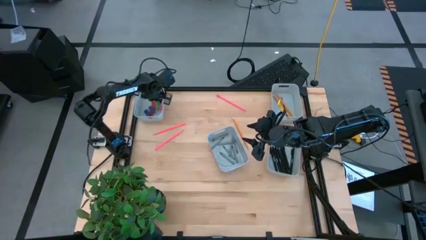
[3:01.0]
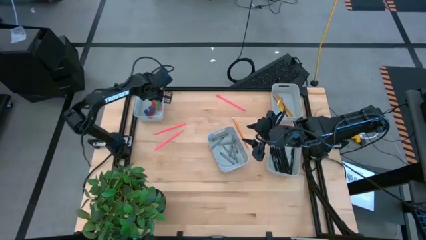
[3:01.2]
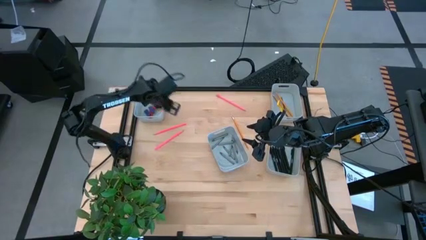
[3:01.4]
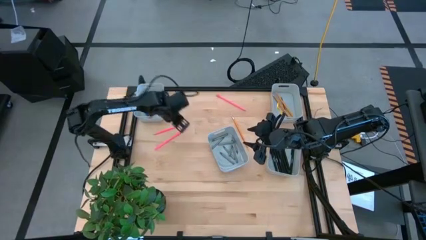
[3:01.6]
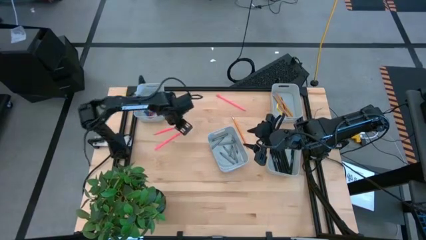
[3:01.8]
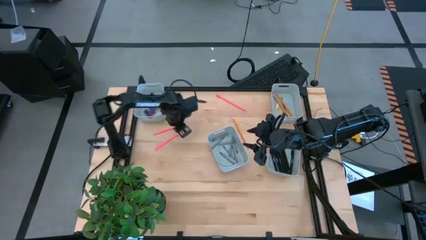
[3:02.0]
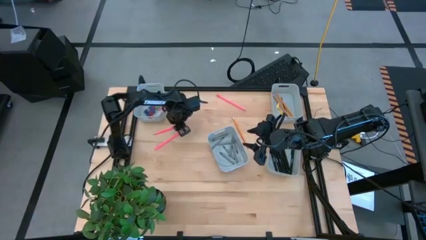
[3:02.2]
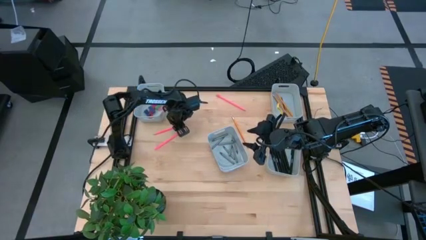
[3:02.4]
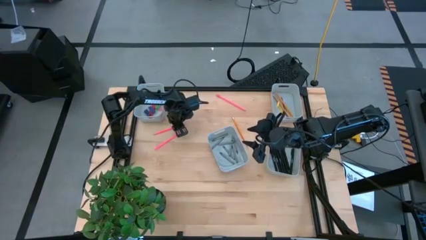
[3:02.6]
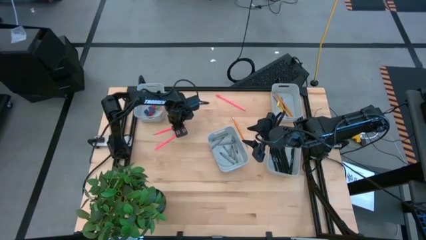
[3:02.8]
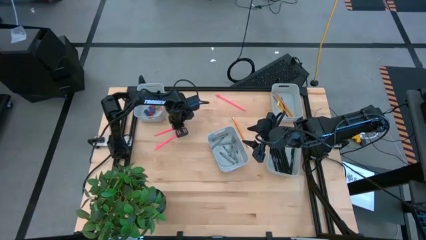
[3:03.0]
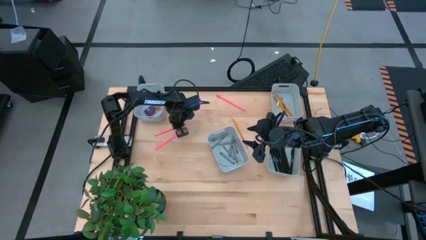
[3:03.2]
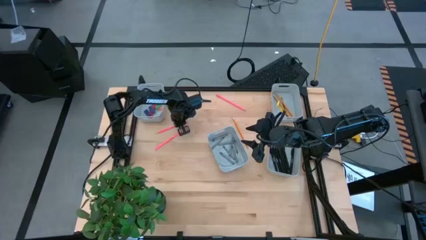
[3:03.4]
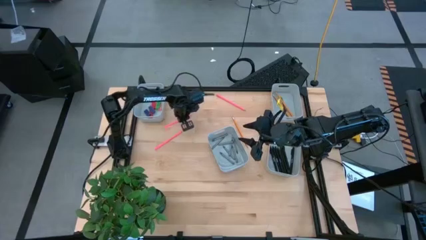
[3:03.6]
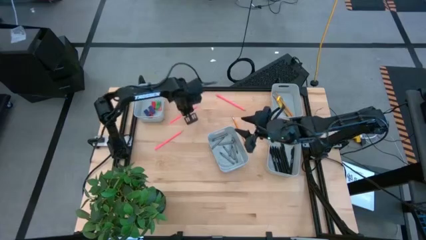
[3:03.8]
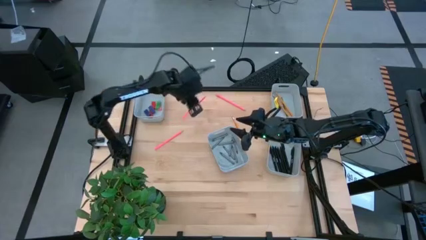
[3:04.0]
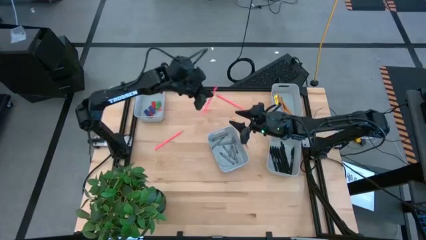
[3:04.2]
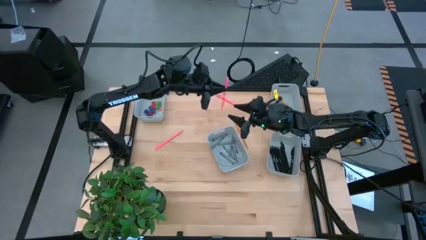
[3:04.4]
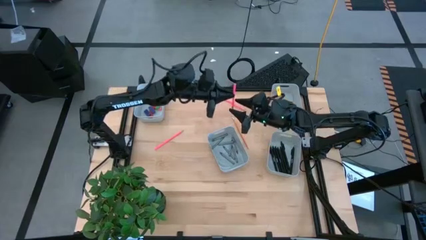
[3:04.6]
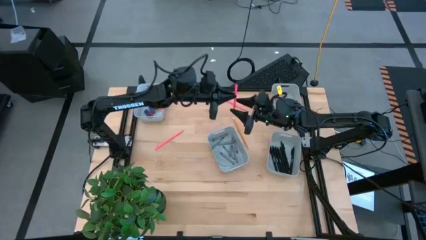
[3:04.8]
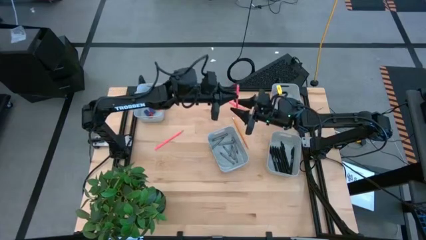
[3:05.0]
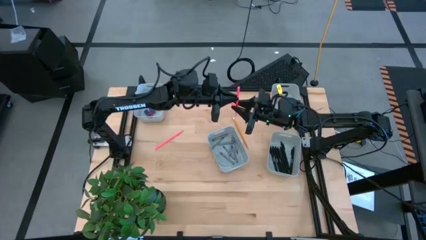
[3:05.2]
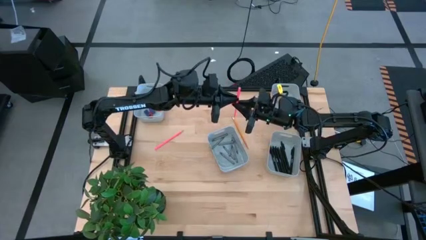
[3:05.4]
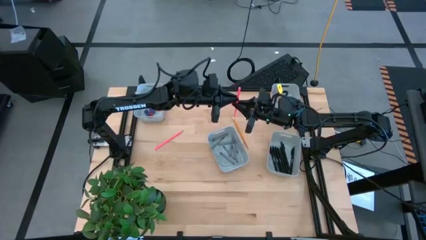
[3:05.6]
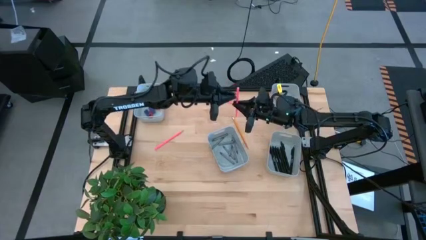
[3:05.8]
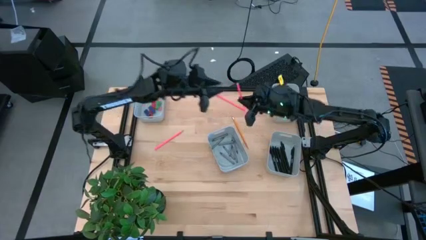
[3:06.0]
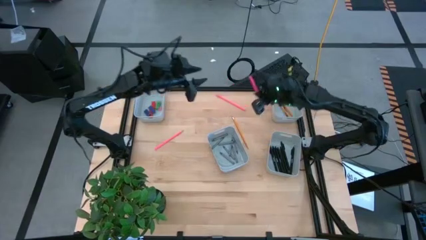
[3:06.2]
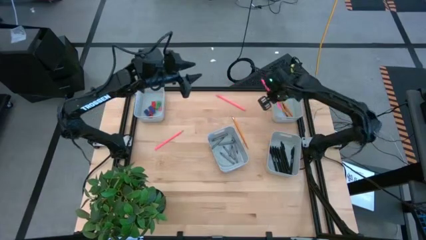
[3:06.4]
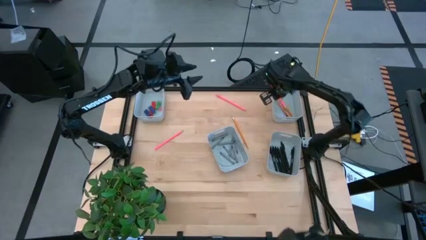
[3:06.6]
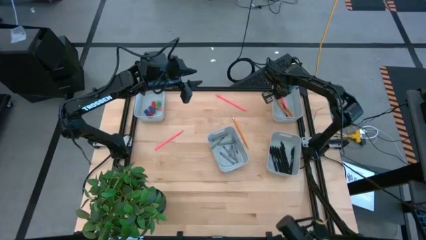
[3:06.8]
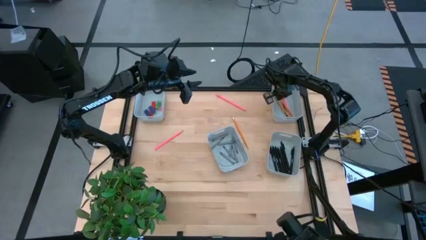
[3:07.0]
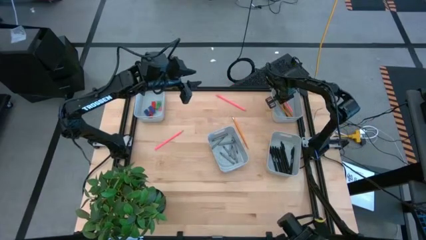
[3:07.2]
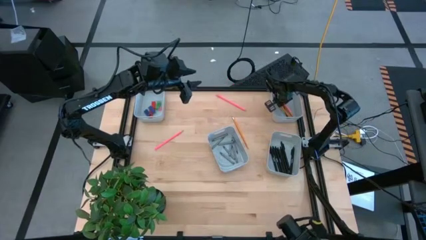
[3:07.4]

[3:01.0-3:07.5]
Task: Sort crayons/erasers/pens/pencils in bins
Put the pink pencil into the top right gray bin

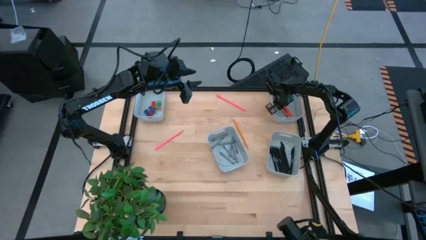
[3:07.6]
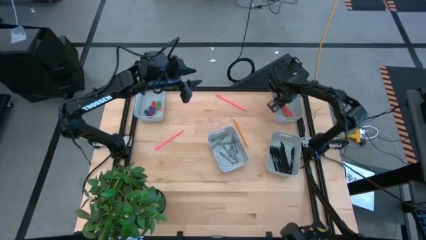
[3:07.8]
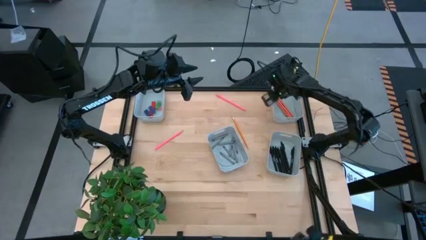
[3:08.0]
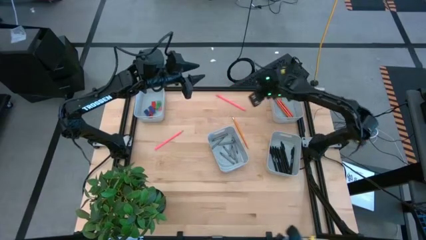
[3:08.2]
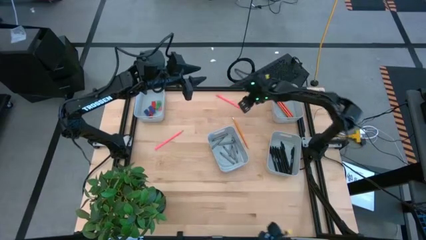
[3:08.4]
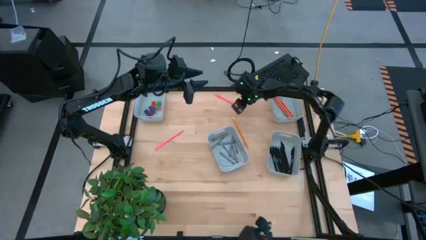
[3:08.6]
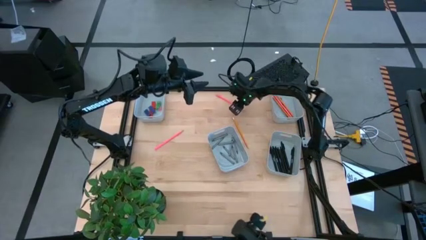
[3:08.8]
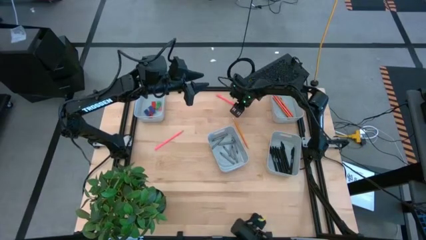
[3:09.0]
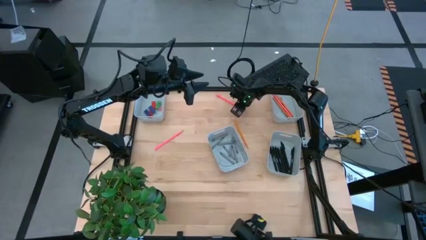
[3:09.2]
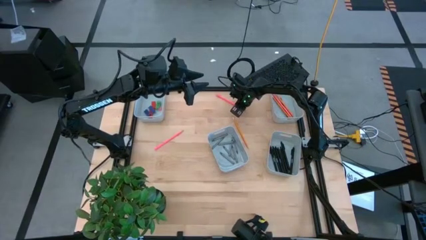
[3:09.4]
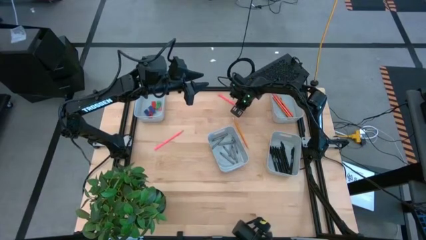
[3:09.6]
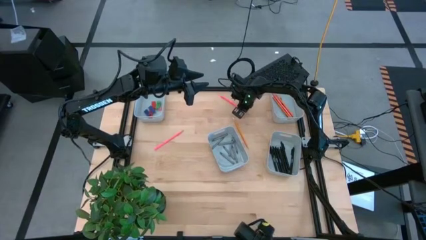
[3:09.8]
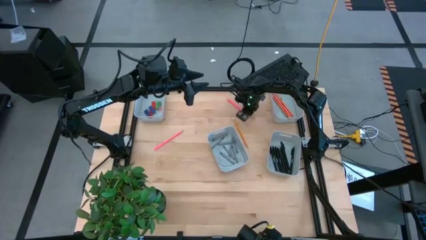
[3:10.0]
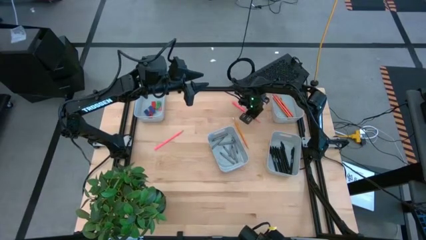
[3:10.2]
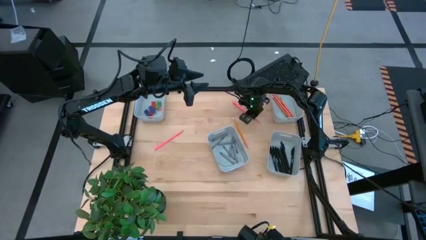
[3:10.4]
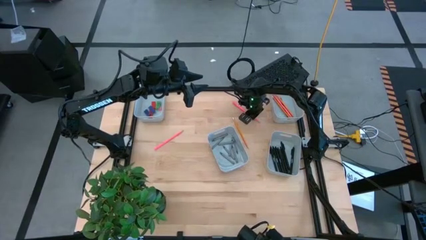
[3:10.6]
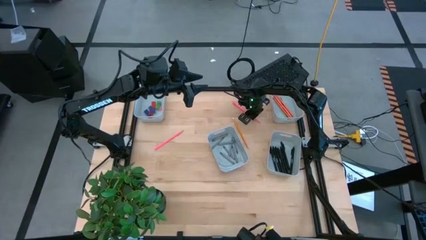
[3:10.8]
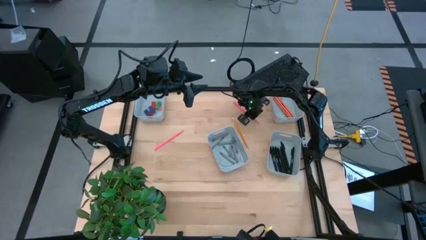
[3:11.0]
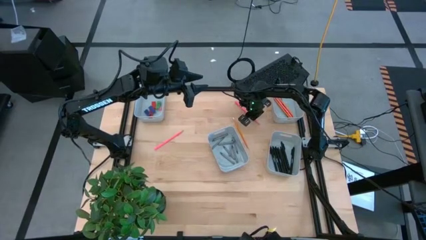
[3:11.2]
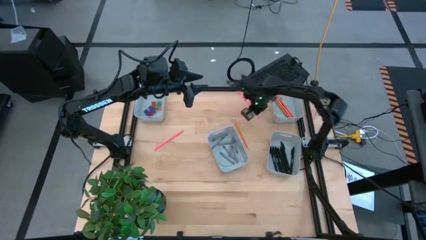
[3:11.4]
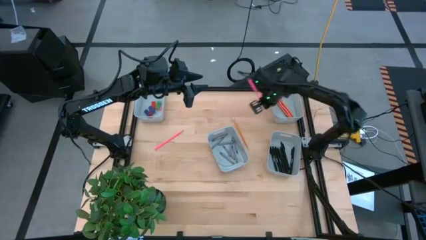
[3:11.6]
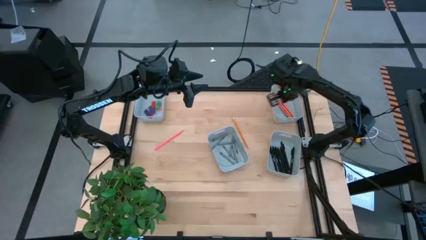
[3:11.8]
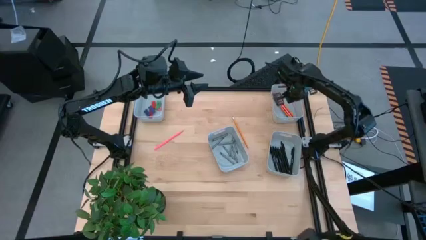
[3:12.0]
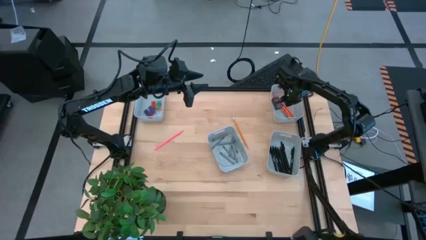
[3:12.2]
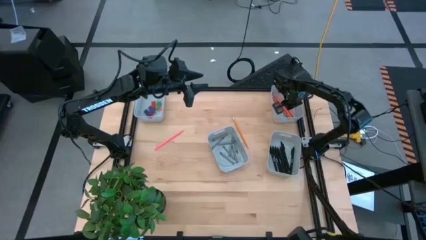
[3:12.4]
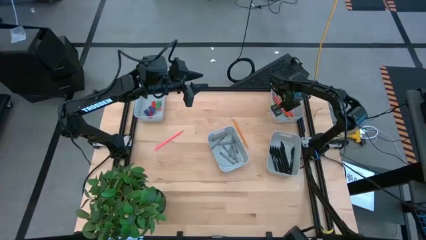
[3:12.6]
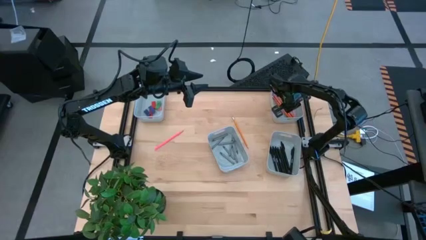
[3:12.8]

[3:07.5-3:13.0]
Put the pink pencil into the top right gray bin

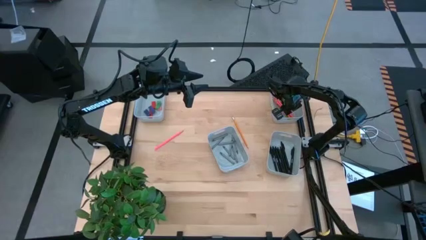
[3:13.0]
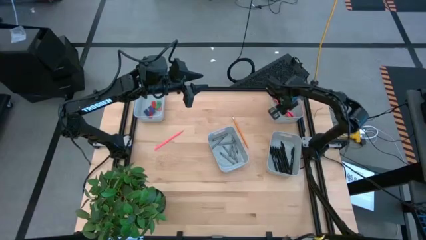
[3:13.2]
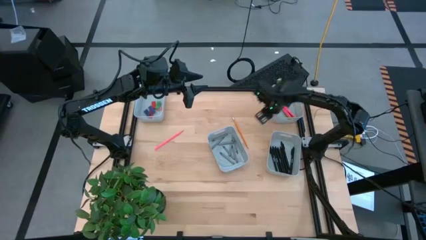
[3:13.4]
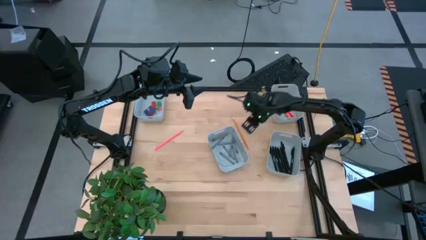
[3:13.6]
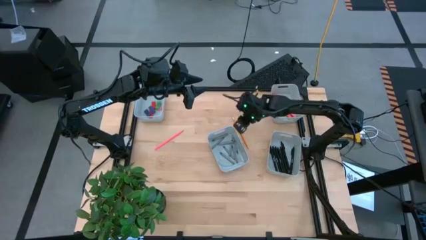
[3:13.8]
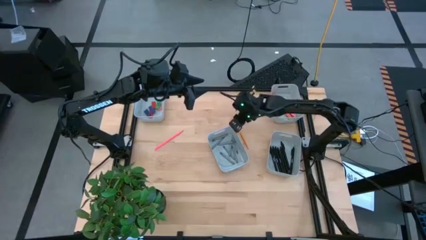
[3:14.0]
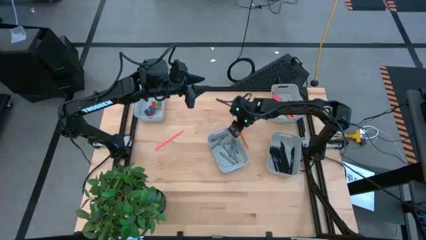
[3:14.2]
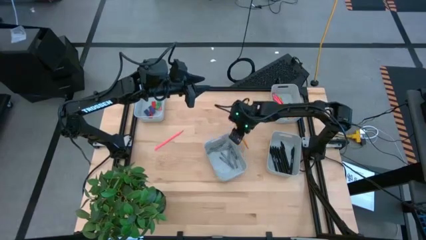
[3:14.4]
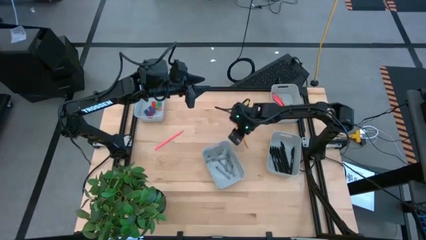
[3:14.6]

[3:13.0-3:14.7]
Adjust the middle left gray bin

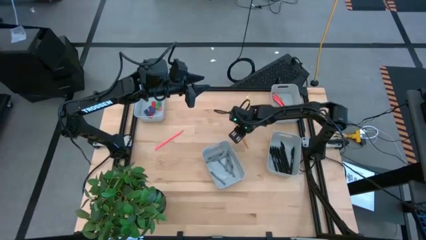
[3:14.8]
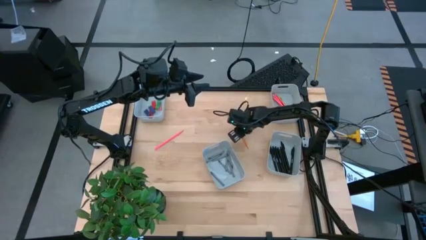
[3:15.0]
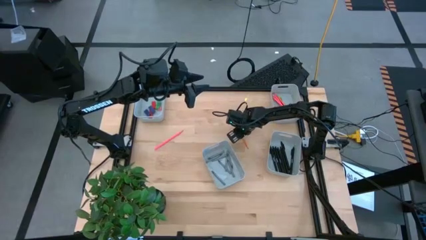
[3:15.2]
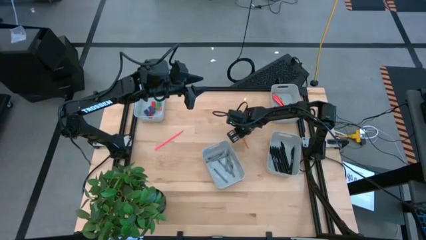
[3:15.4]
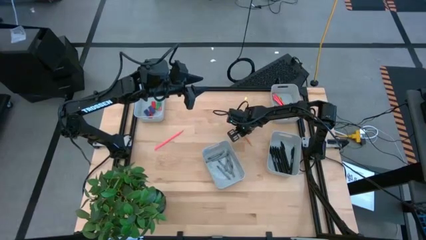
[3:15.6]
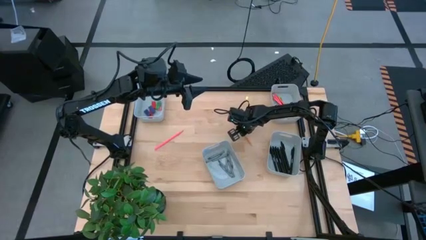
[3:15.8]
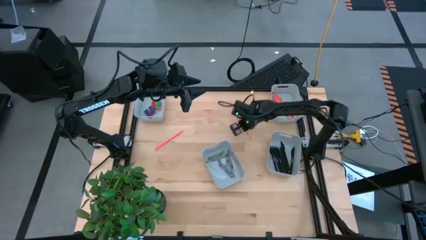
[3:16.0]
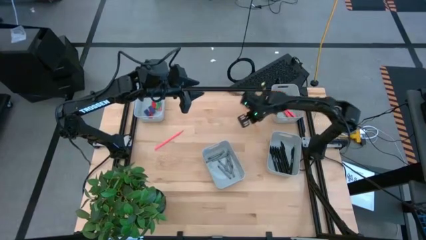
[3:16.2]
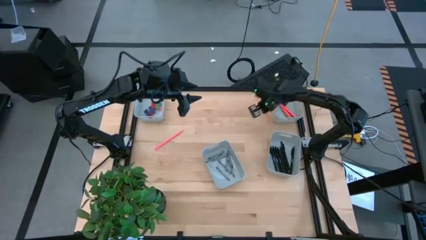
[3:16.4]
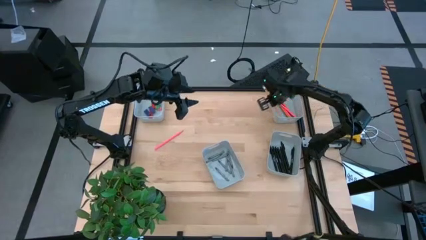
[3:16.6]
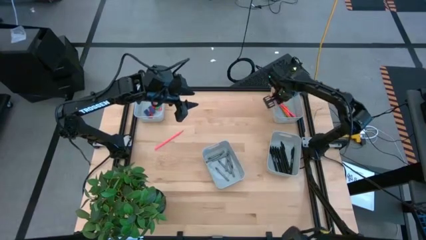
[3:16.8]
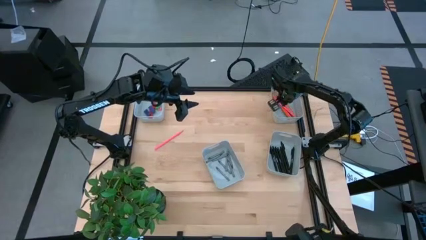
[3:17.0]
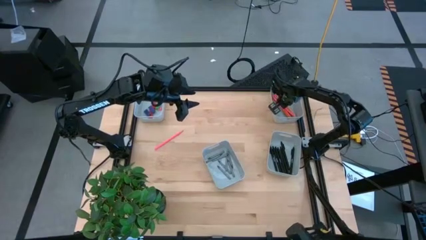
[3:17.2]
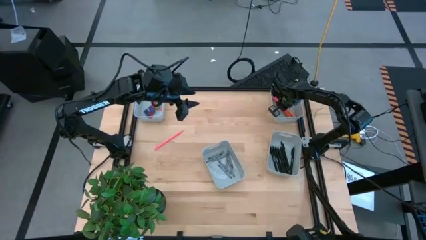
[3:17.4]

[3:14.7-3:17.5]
Put the yellow pencil into the top right gray bin
